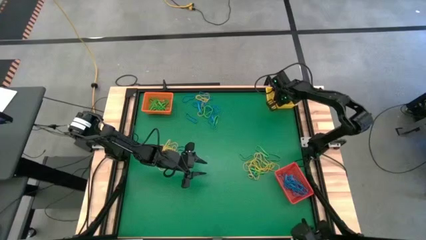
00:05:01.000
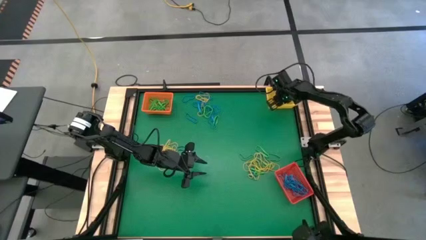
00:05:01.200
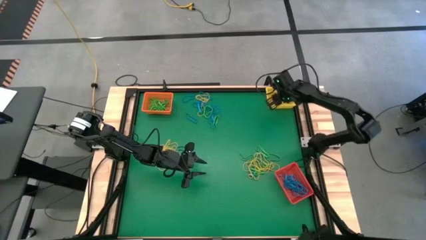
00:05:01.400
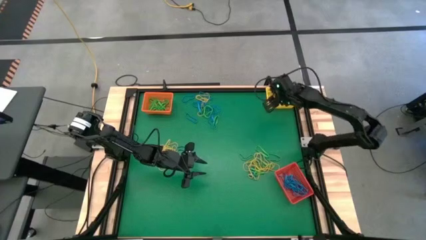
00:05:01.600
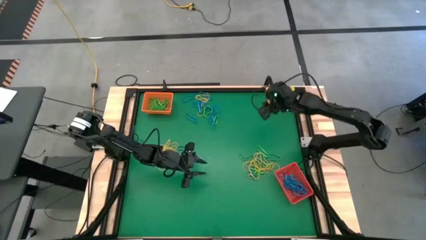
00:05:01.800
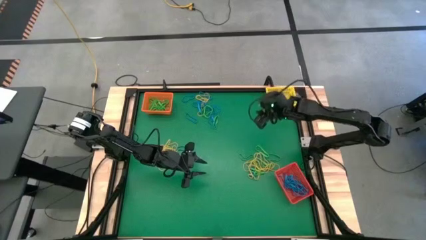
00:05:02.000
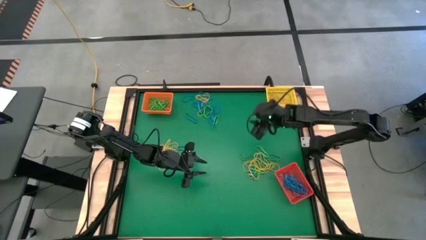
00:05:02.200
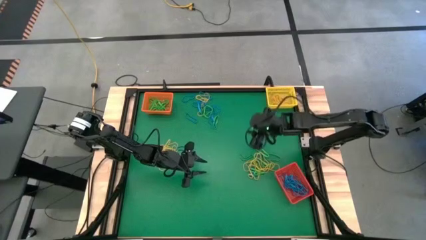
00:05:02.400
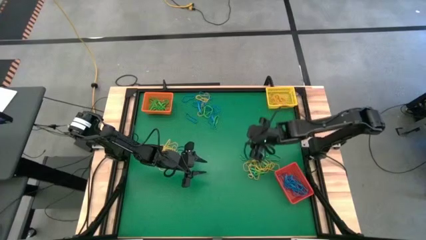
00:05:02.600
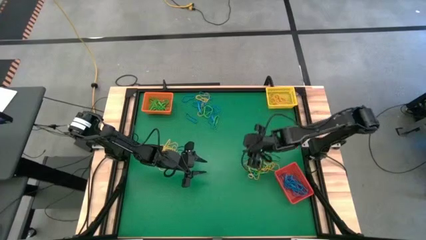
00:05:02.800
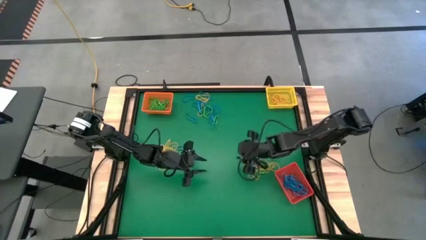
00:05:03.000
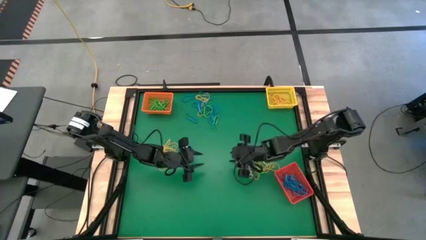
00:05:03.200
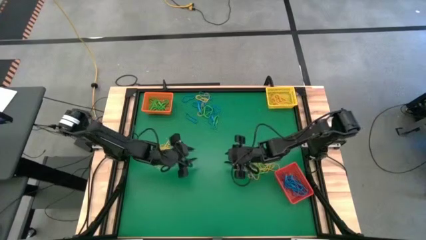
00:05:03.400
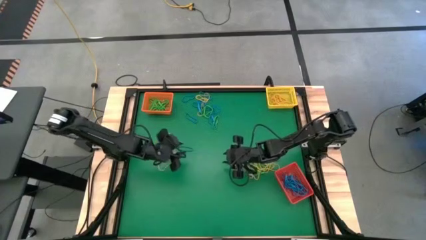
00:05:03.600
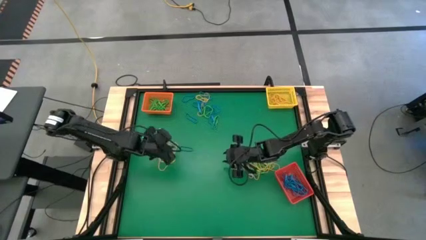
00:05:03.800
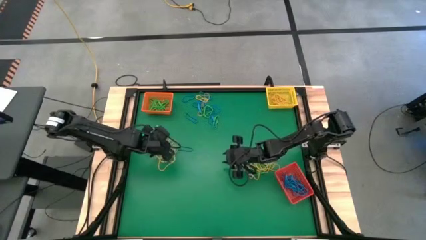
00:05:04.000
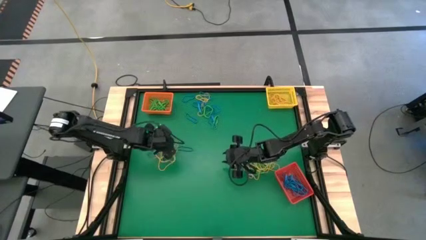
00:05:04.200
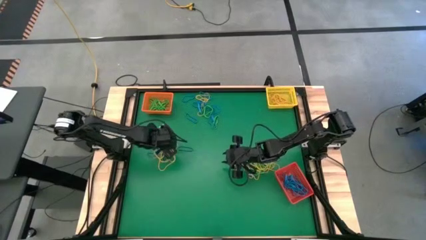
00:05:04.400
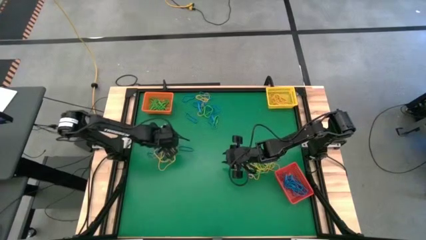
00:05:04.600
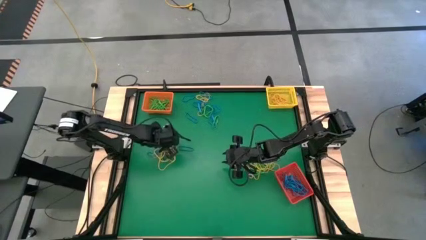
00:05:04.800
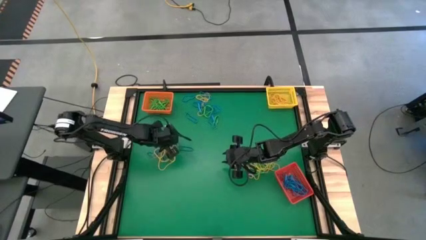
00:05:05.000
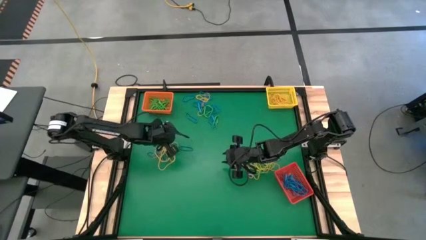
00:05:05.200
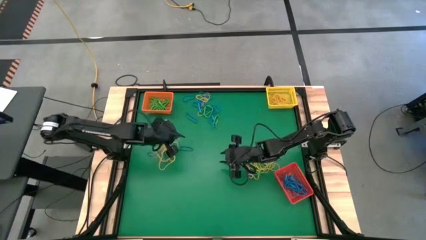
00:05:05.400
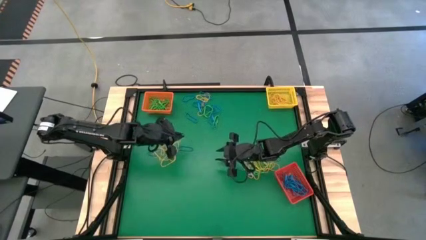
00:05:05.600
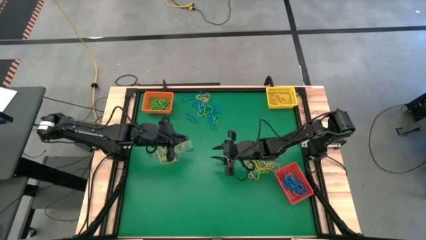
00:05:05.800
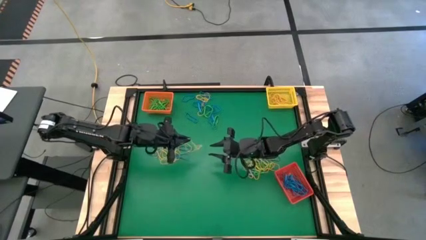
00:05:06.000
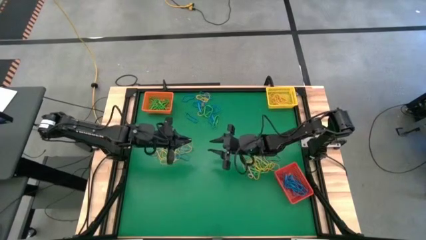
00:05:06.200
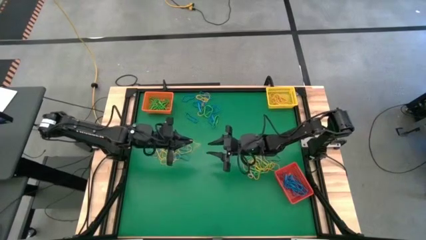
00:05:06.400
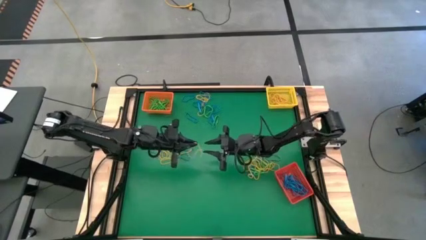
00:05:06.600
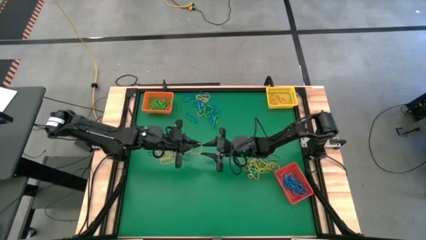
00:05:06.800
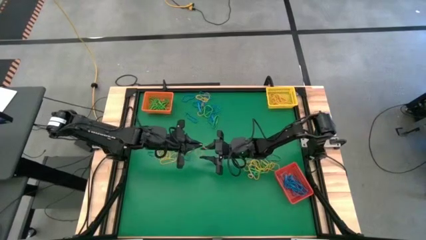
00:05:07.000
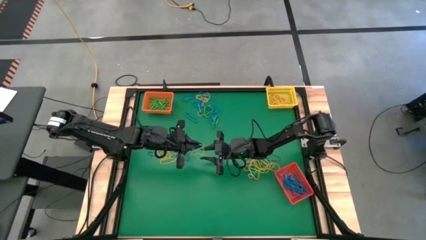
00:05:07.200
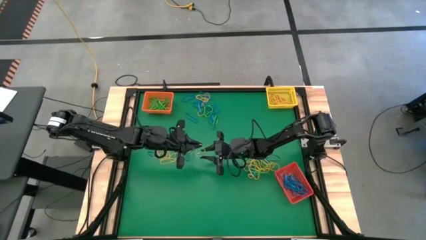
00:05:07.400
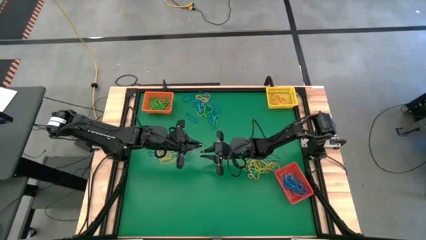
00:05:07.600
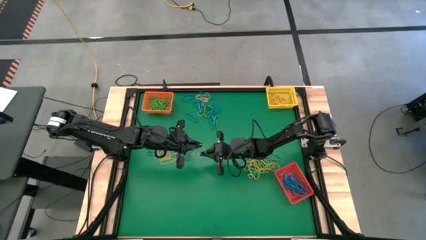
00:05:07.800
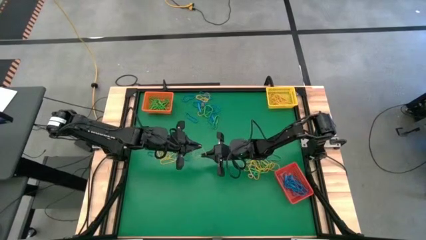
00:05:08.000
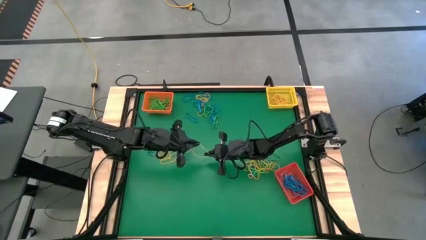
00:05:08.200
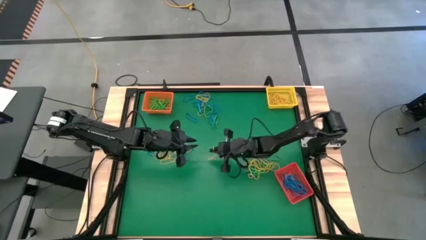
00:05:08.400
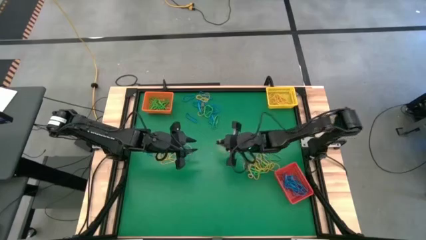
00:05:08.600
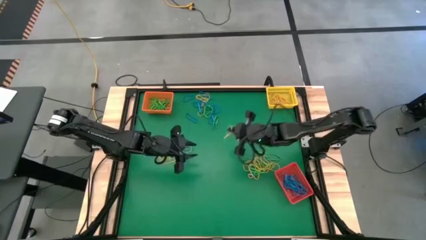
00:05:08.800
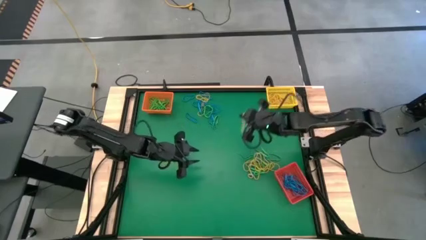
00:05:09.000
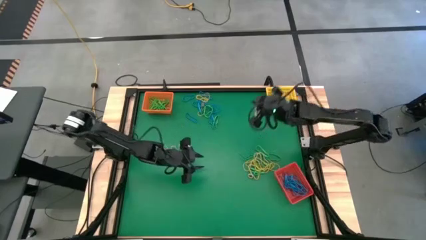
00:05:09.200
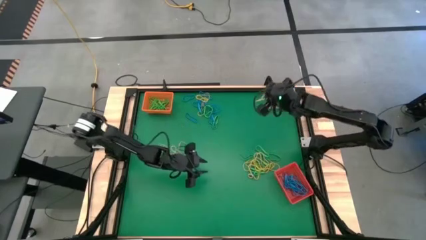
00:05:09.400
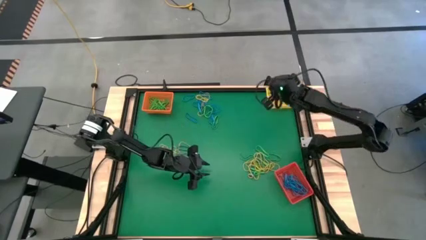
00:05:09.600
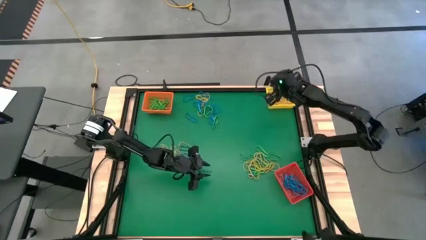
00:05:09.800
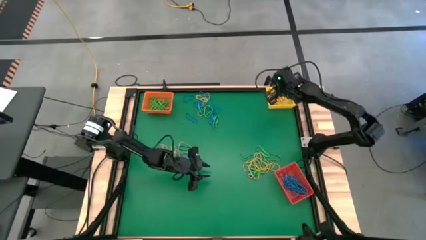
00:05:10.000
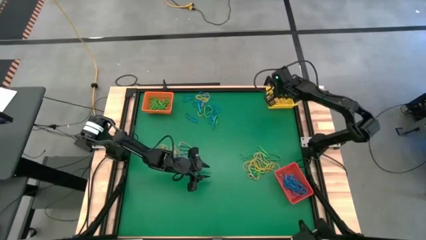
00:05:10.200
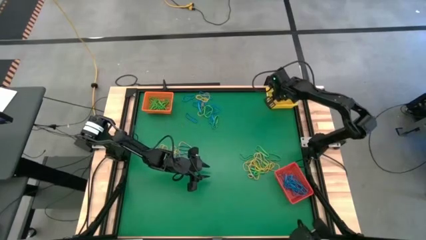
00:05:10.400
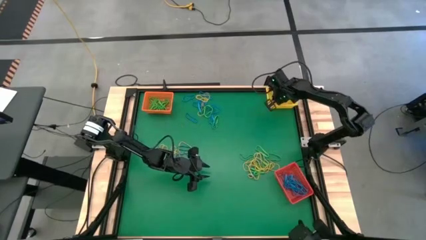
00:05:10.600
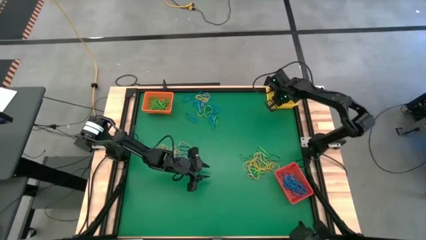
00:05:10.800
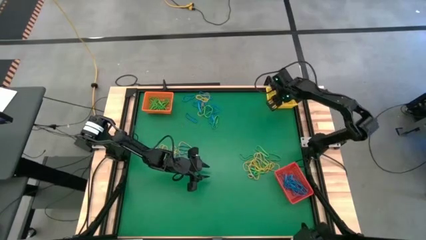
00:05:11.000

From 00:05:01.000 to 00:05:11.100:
Task: Sort rubber bands into baskets
Put the yellow rubber band into the yellow bin

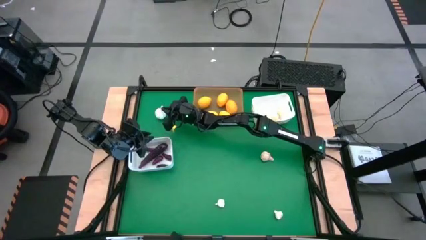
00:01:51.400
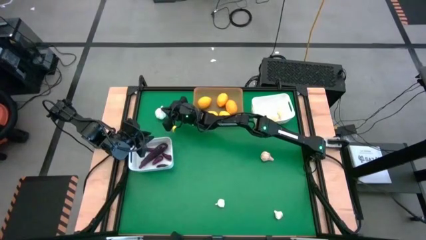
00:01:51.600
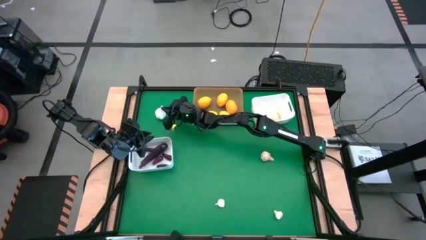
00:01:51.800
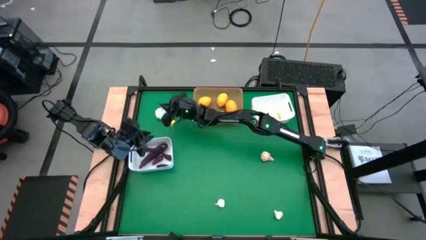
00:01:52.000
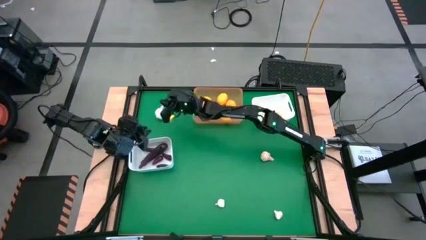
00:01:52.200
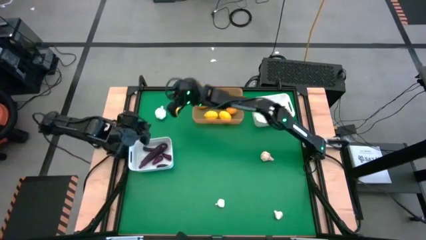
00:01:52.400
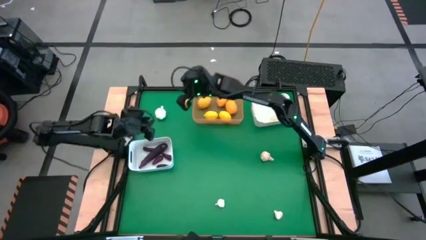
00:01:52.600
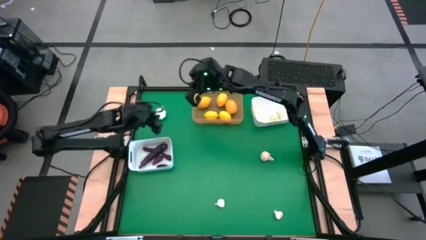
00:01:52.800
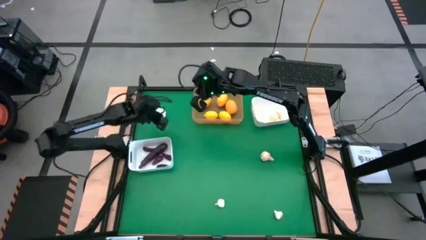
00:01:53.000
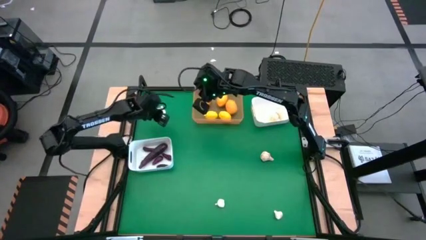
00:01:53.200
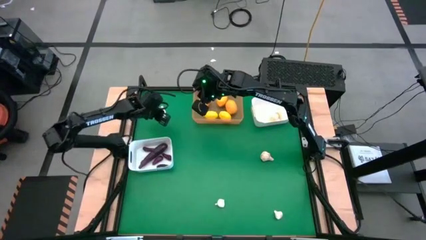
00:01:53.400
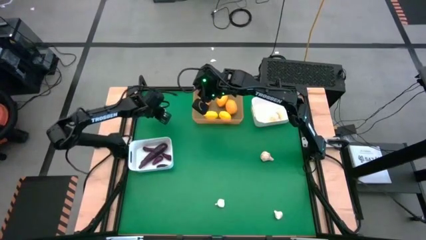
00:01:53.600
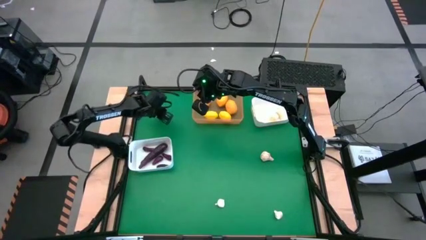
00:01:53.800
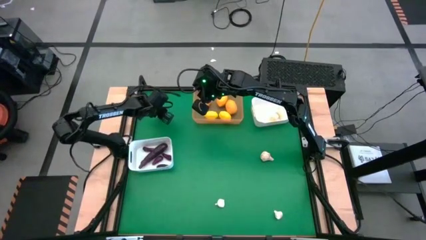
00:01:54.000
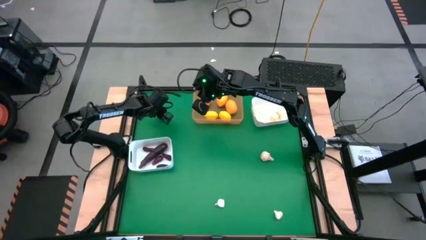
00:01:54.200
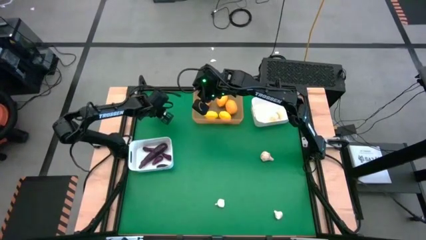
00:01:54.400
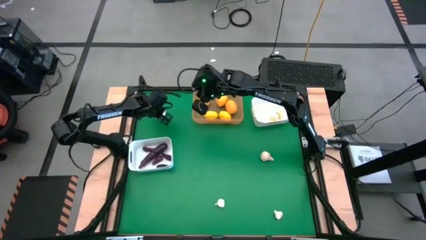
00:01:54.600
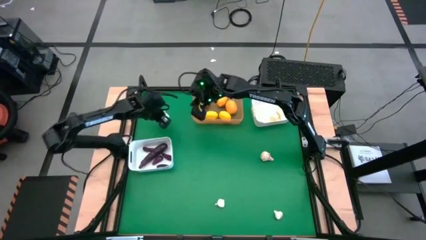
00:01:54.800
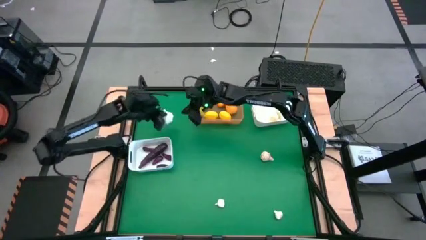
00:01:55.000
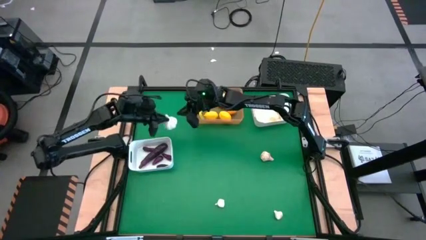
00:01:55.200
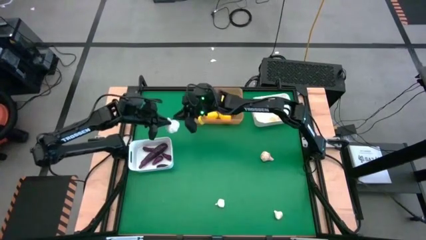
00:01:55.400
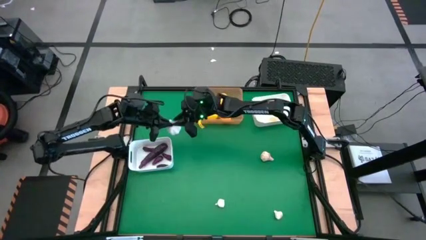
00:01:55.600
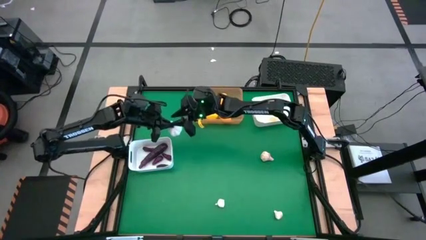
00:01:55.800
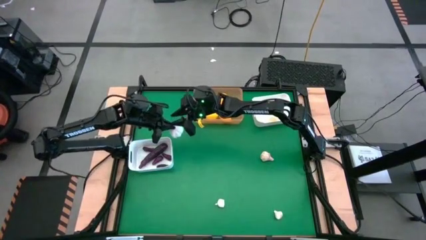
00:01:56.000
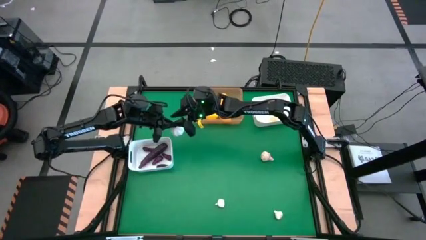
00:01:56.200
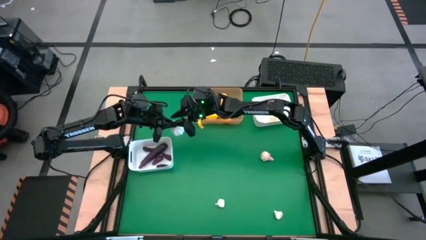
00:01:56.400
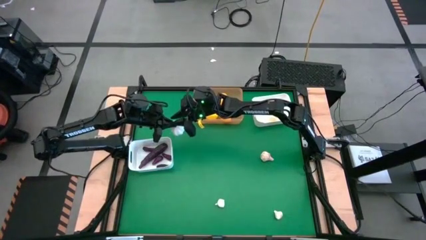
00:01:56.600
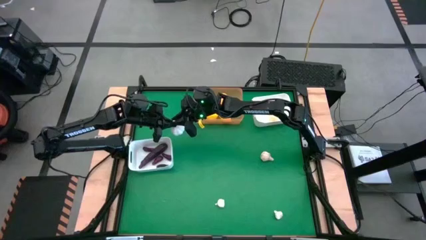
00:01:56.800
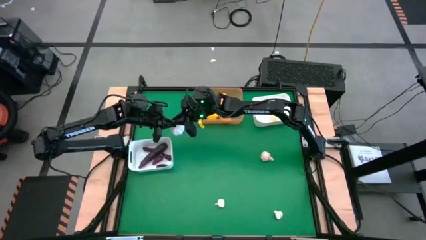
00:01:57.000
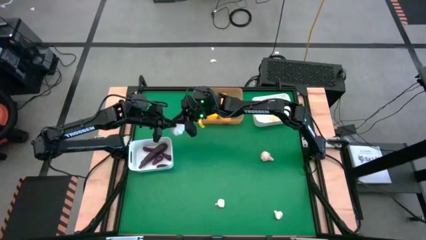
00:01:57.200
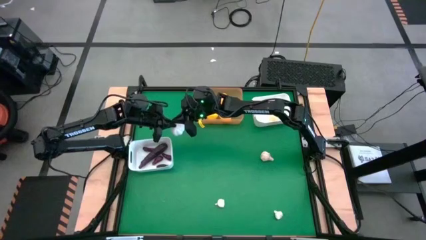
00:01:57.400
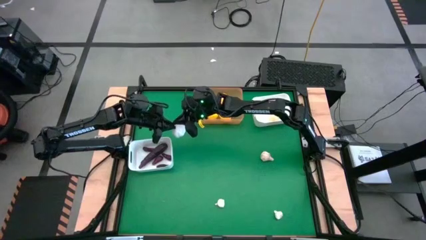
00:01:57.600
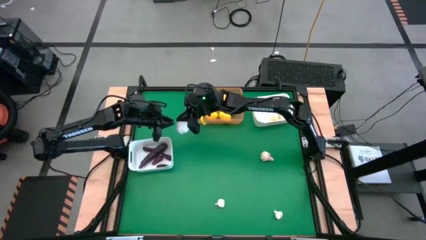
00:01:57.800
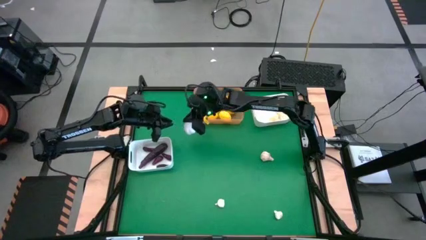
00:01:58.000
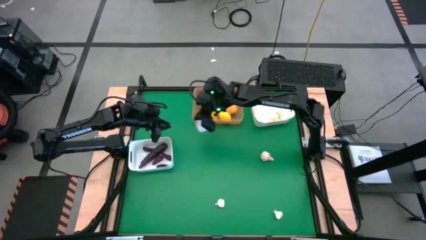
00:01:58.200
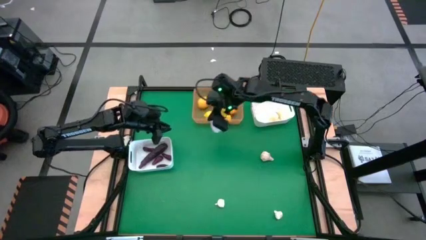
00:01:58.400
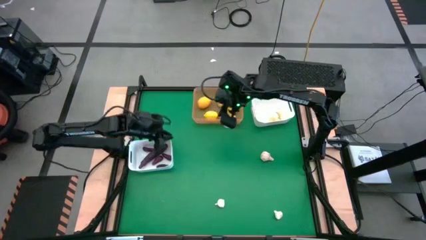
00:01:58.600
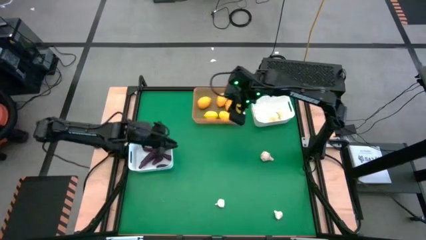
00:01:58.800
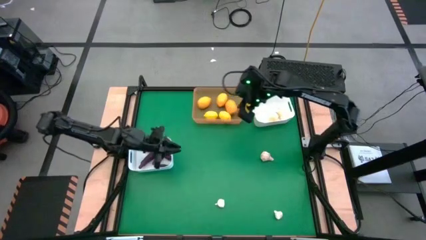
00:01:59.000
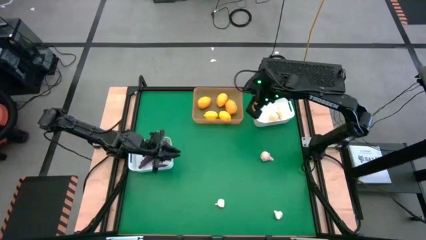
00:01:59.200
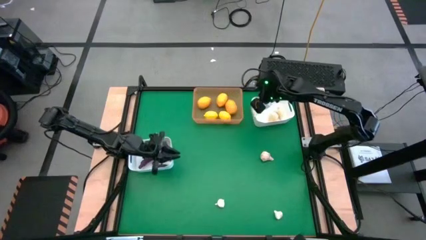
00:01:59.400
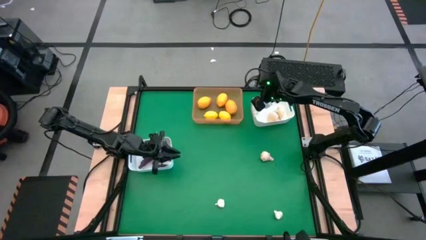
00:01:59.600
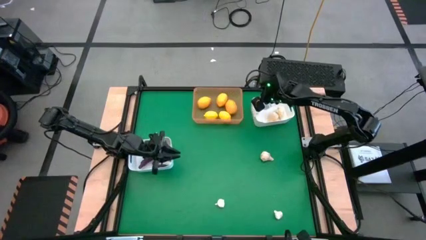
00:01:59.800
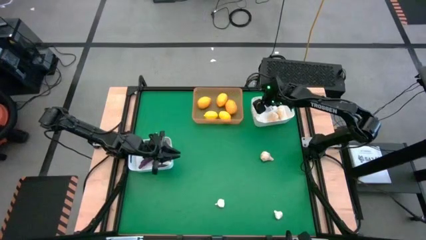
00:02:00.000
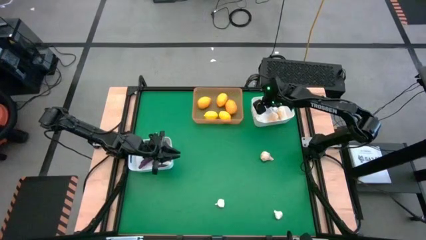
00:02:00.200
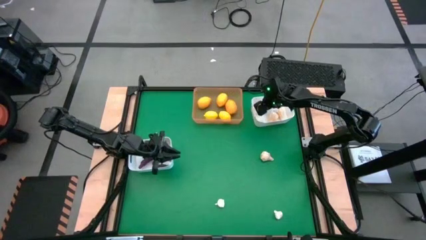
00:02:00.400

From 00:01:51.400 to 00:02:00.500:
Task: Sort produce into baskets
Put the garlic into the right white bin
